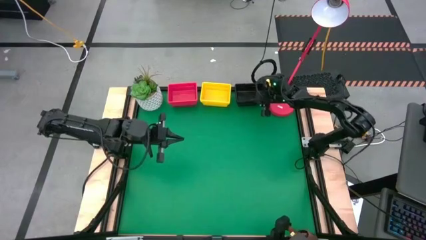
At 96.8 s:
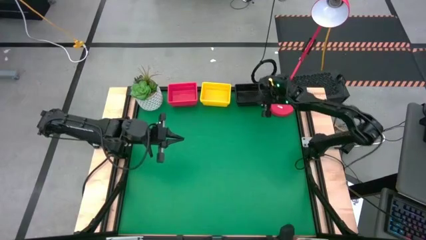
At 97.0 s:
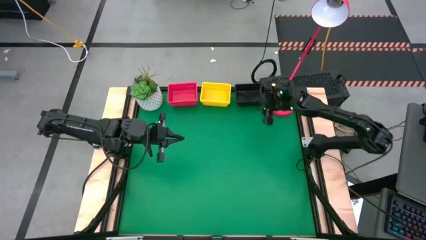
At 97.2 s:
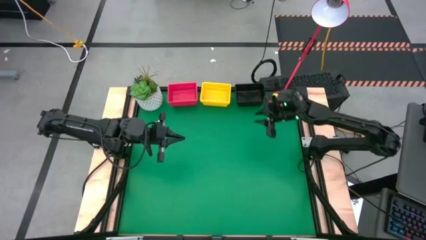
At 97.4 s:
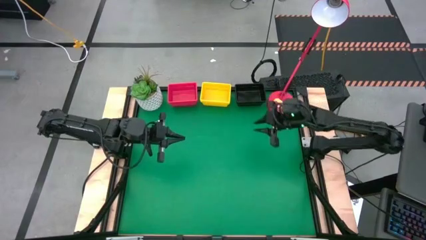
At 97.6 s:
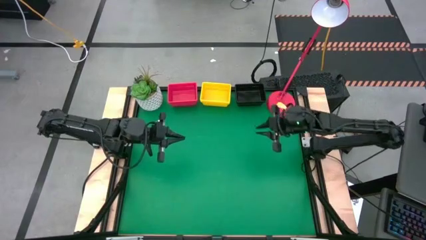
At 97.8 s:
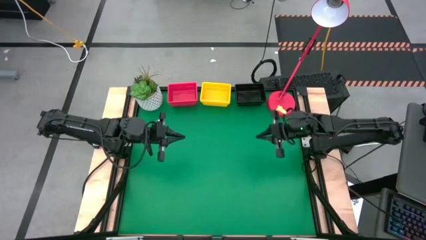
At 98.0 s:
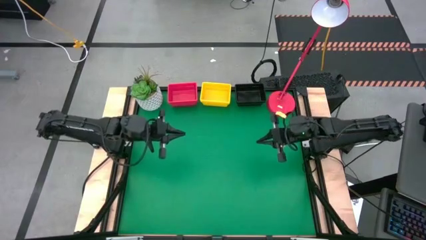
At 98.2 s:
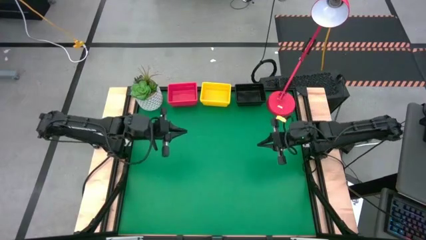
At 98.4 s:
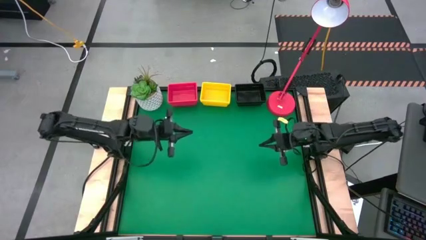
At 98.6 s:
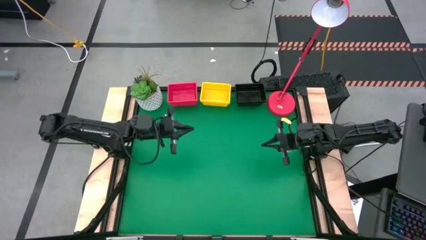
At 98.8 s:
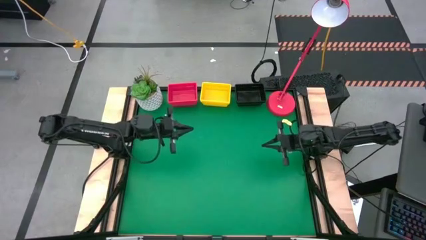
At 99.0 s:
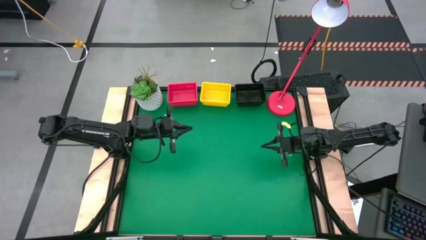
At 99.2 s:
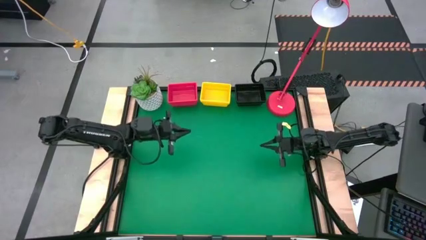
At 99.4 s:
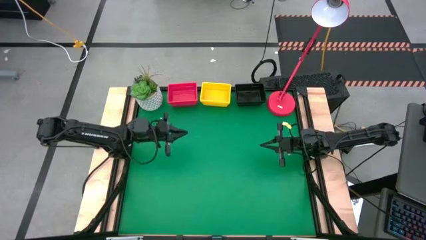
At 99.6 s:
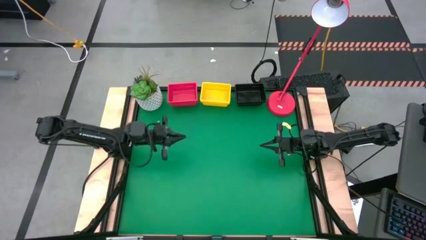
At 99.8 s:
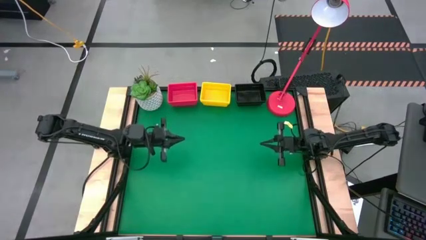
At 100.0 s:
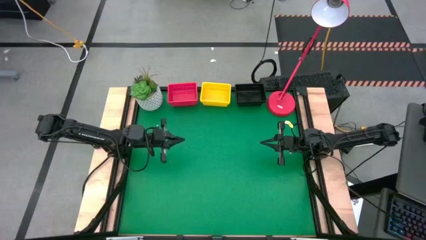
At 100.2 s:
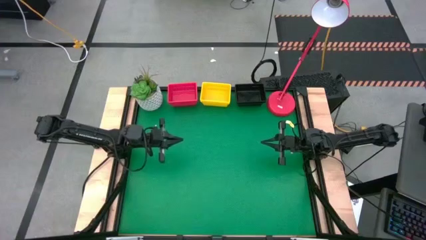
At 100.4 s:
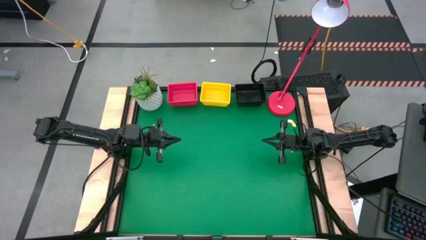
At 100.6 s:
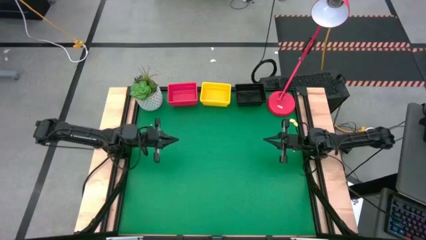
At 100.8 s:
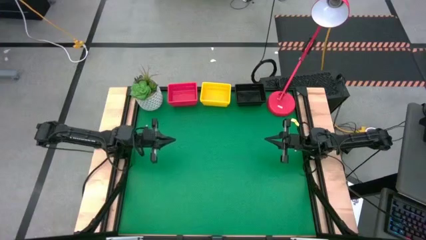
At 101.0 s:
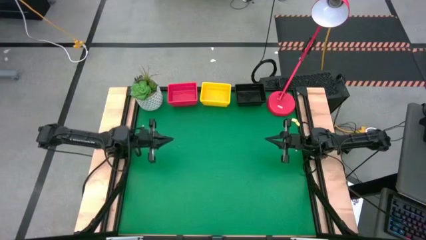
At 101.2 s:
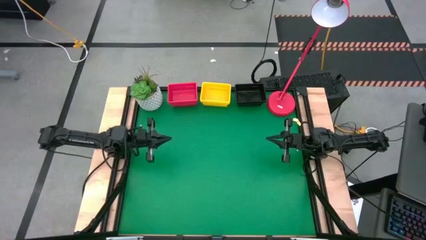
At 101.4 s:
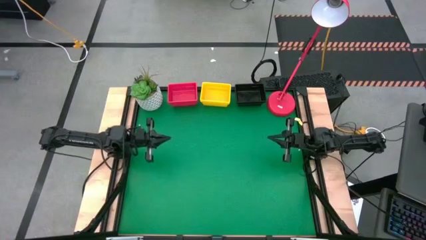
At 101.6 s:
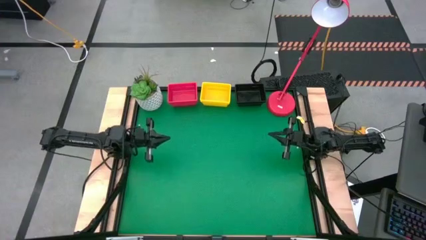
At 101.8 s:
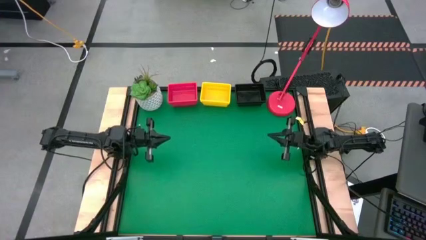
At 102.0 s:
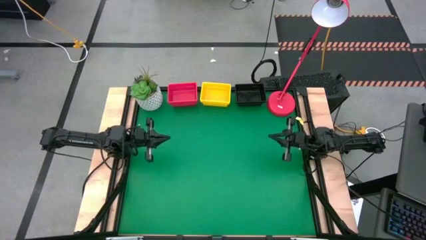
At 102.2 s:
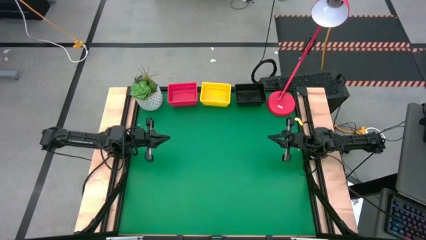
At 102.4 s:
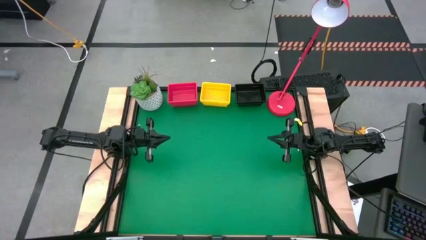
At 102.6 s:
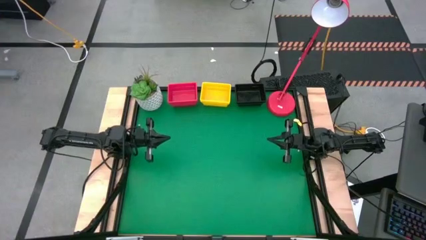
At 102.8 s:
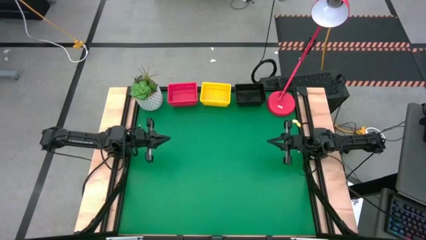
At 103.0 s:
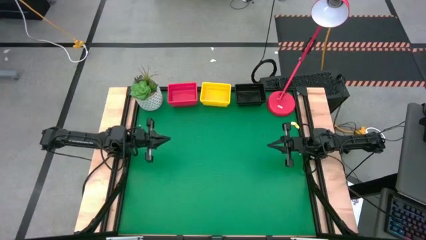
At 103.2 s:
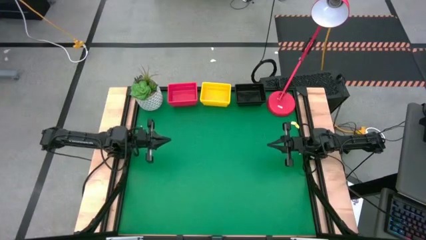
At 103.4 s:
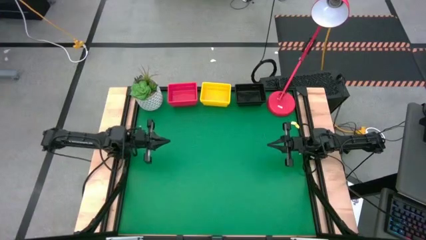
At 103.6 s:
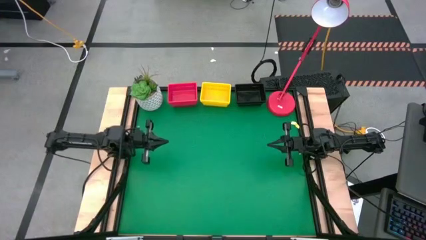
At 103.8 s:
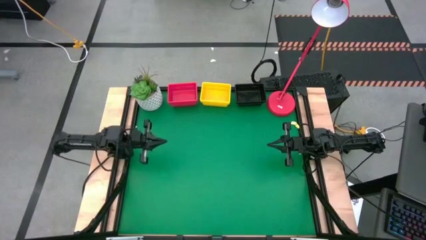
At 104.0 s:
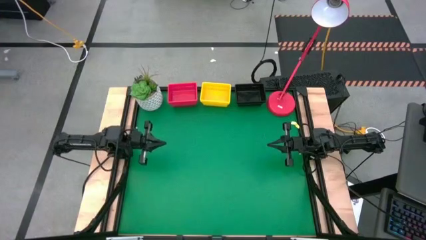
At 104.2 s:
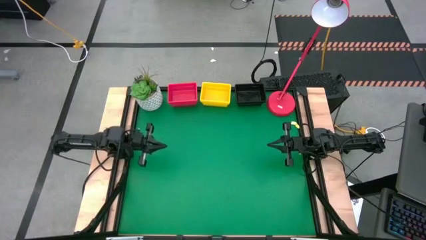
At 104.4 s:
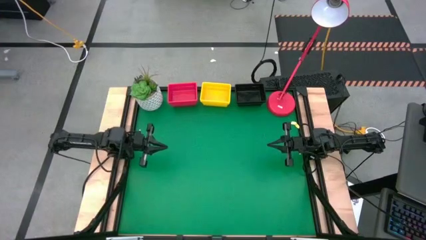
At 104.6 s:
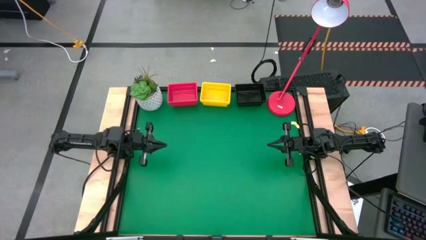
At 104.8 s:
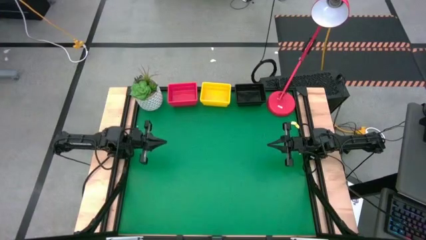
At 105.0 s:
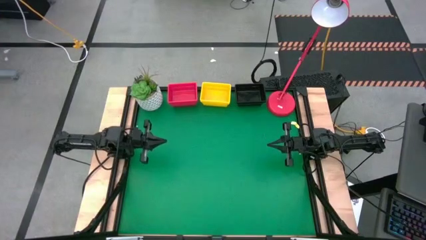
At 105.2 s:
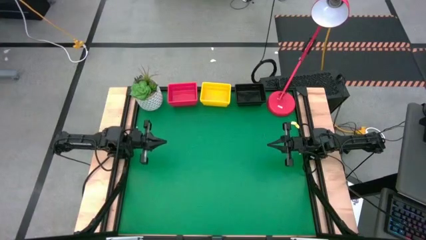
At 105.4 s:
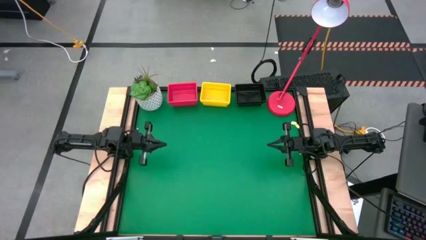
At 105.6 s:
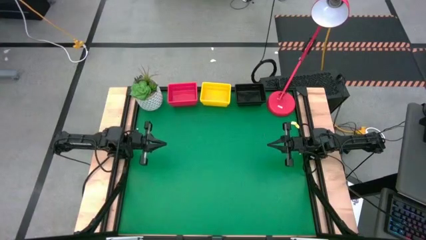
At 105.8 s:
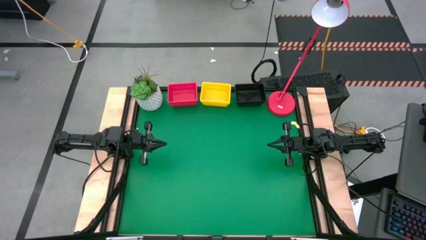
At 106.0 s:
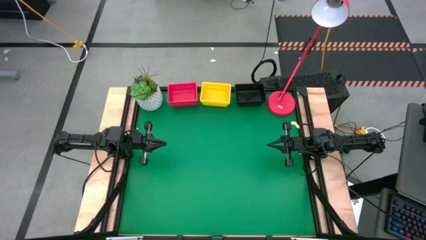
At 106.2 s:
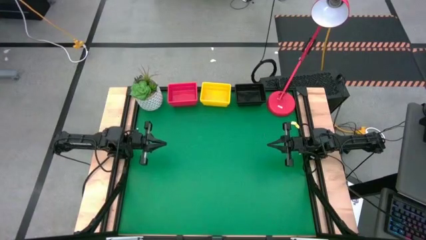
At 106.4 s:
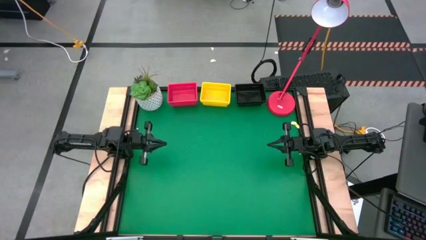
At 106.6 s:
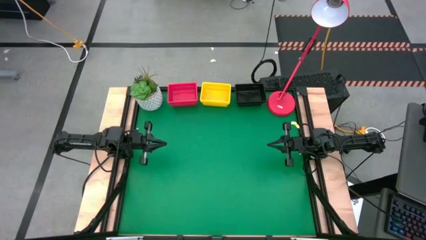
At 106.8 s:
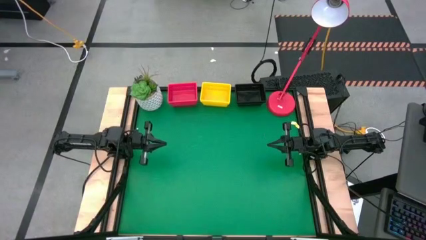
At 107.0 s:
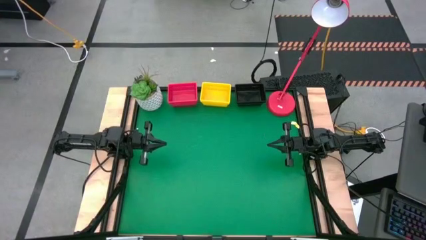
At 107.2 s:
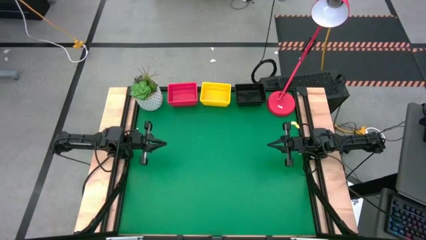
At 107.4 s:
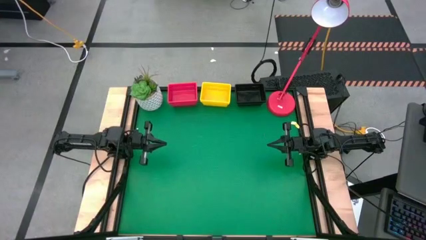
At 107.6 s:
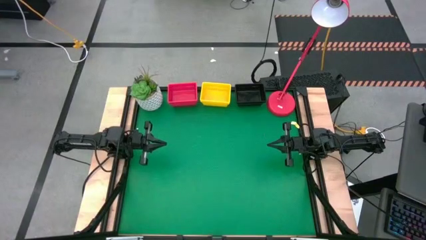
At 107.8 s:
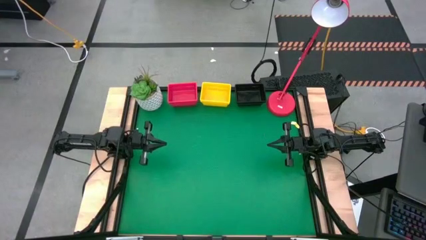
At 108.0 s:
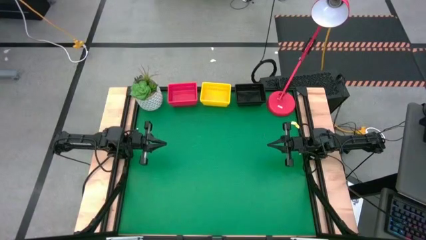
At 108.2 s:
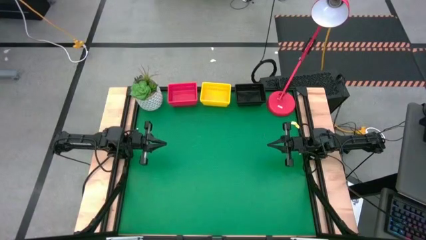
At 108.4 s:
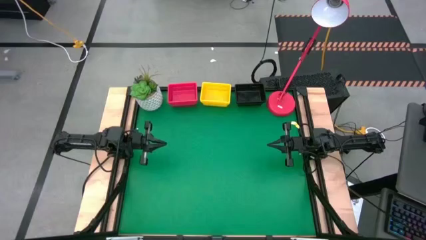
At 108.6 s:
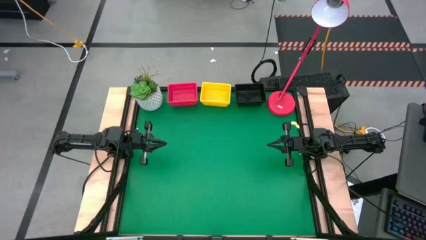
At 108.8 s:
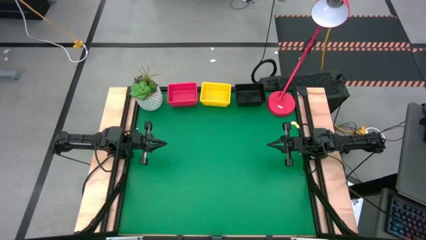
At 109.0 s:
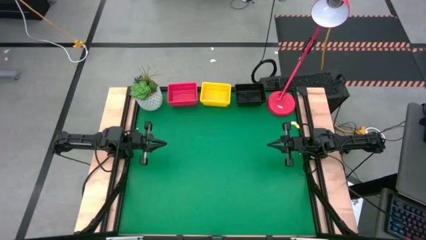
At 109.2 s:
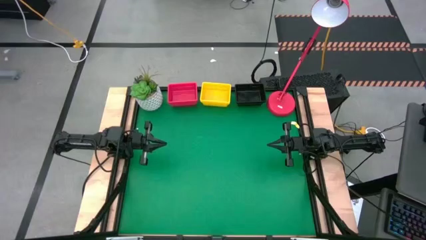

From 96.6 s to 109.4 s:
Return to Home Position
